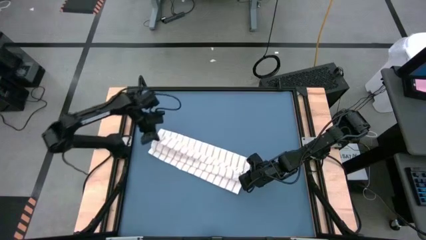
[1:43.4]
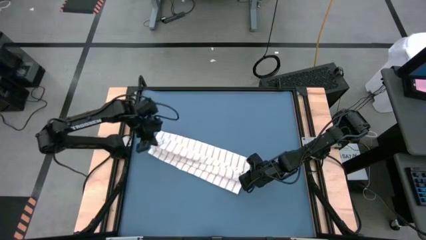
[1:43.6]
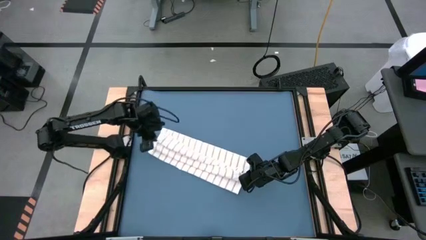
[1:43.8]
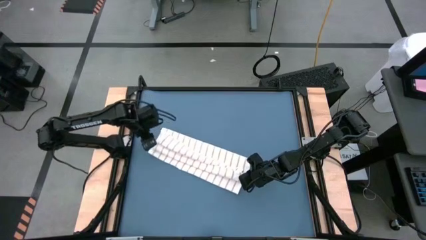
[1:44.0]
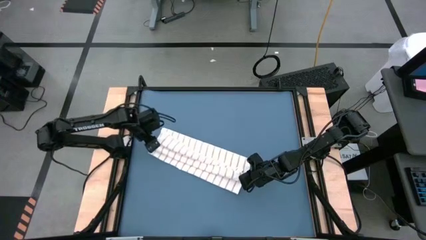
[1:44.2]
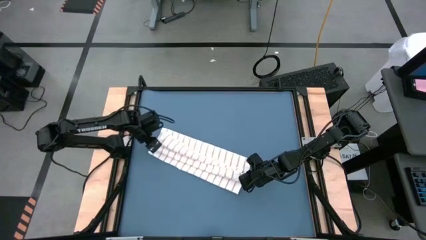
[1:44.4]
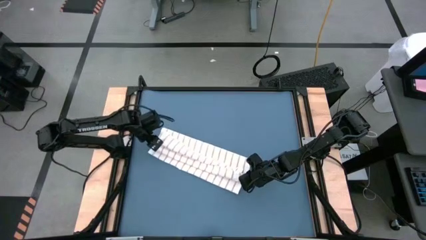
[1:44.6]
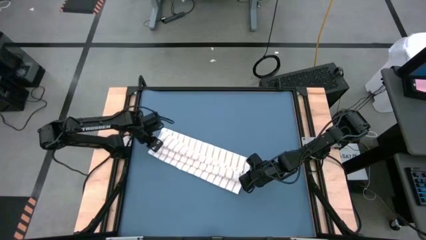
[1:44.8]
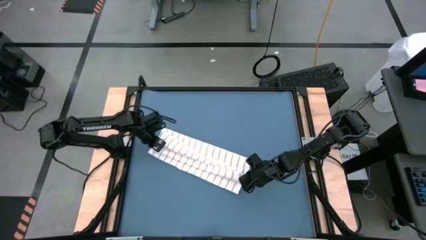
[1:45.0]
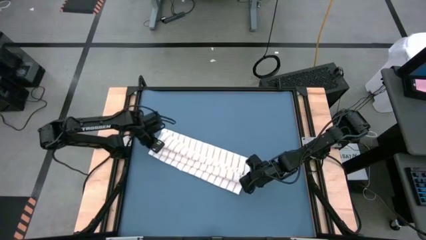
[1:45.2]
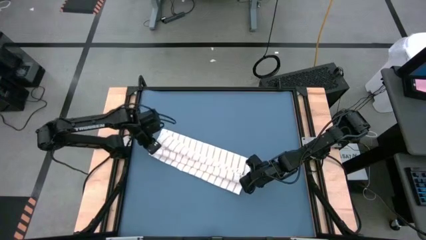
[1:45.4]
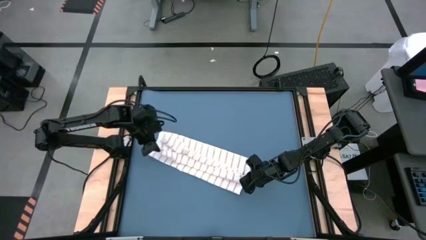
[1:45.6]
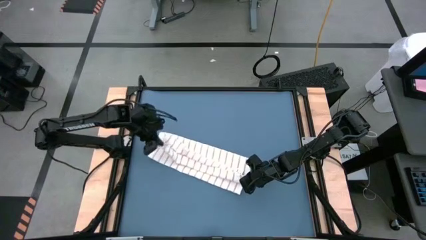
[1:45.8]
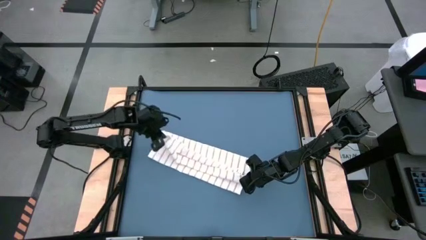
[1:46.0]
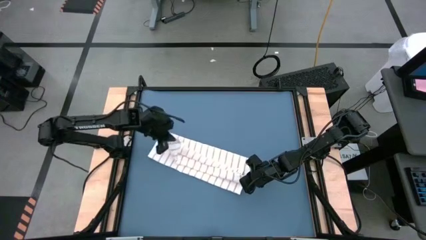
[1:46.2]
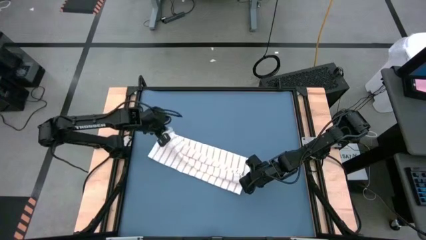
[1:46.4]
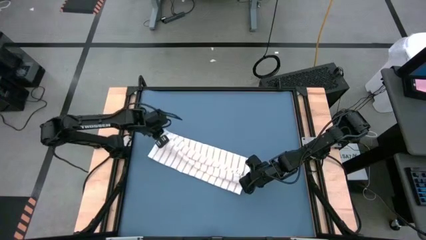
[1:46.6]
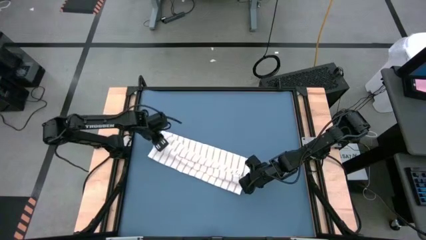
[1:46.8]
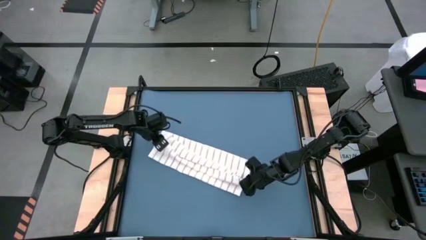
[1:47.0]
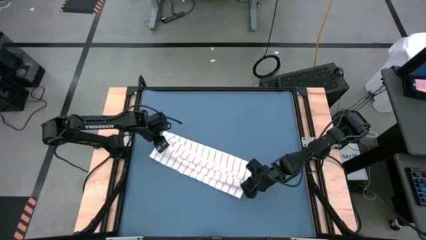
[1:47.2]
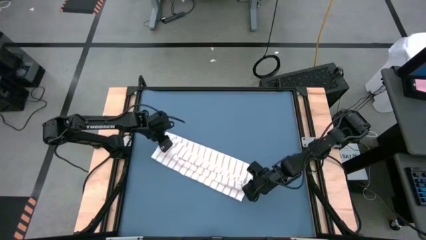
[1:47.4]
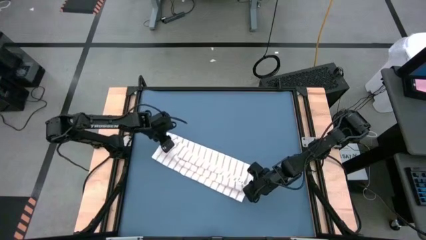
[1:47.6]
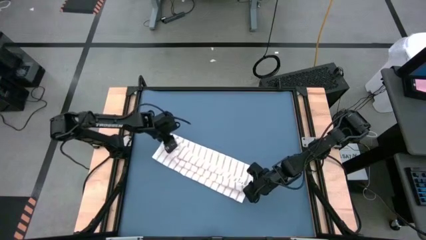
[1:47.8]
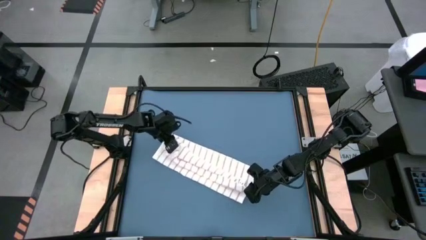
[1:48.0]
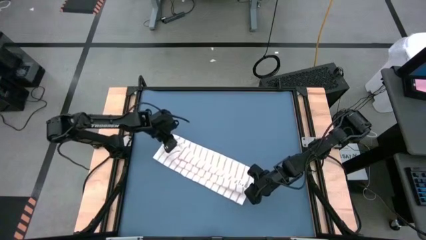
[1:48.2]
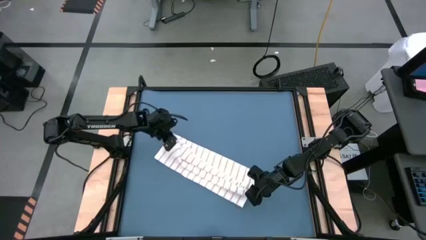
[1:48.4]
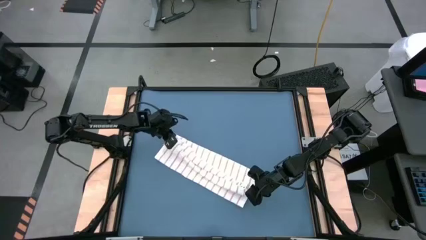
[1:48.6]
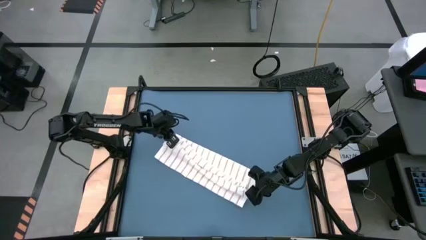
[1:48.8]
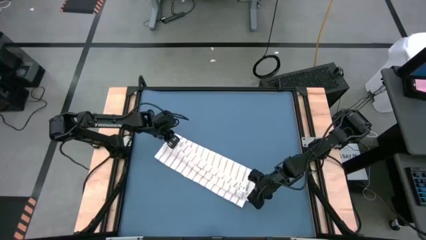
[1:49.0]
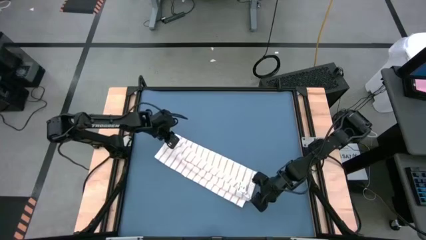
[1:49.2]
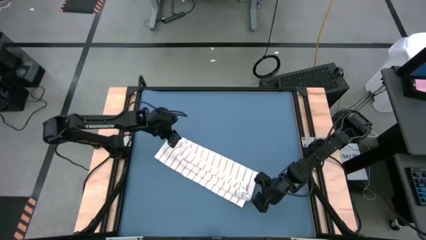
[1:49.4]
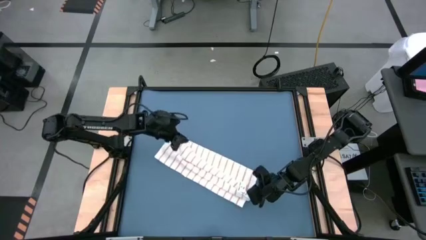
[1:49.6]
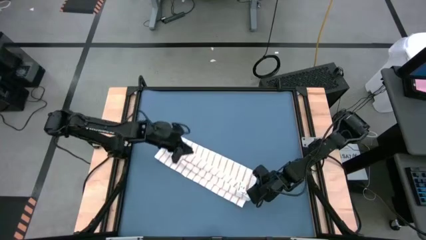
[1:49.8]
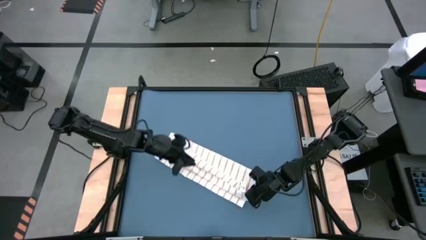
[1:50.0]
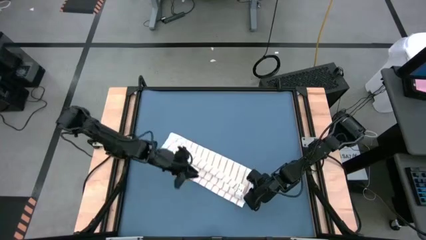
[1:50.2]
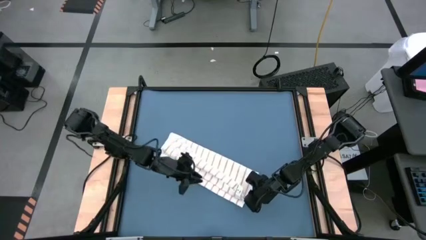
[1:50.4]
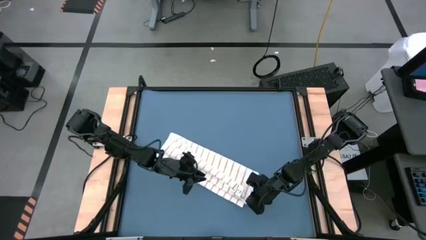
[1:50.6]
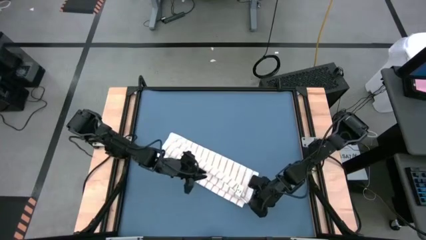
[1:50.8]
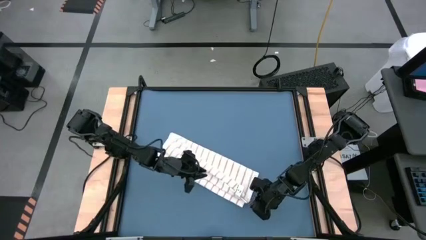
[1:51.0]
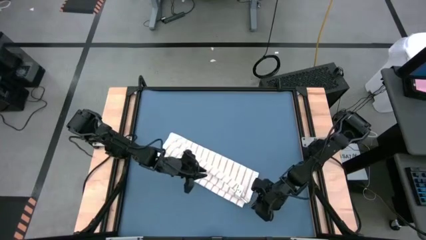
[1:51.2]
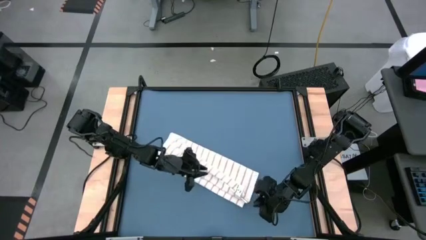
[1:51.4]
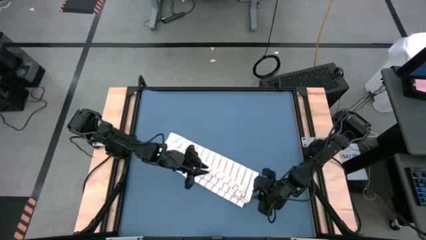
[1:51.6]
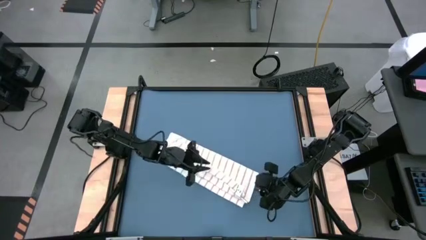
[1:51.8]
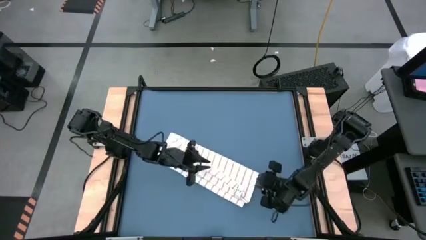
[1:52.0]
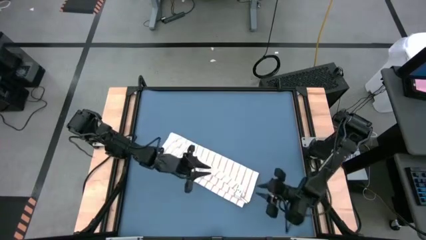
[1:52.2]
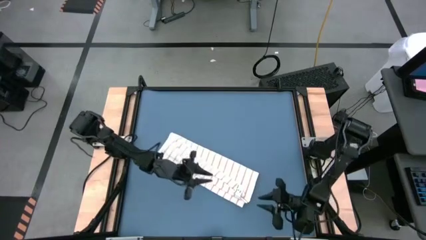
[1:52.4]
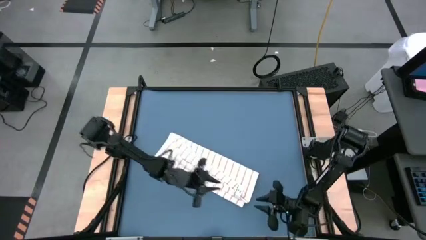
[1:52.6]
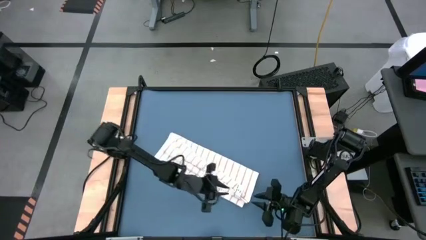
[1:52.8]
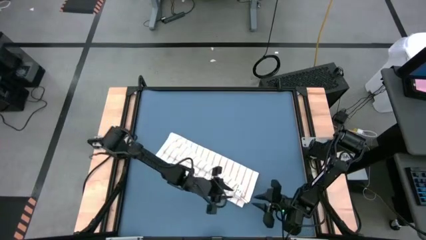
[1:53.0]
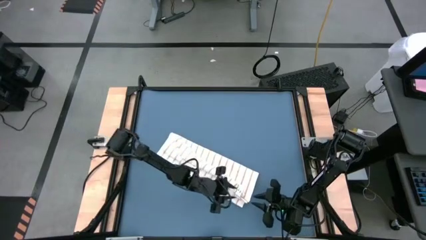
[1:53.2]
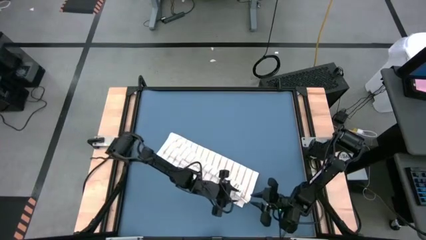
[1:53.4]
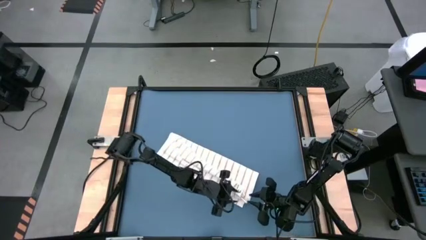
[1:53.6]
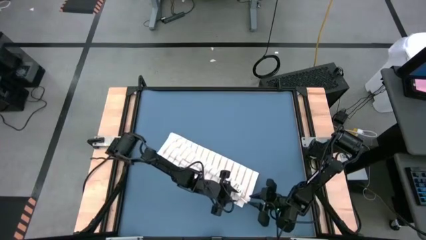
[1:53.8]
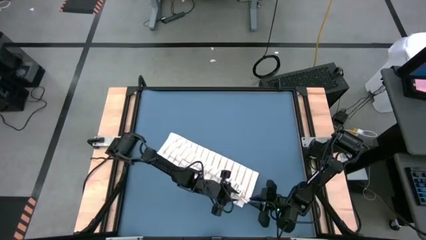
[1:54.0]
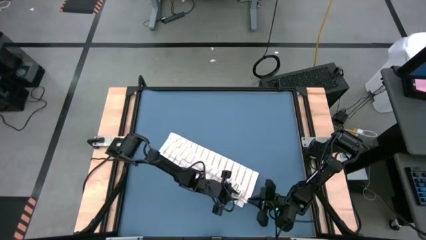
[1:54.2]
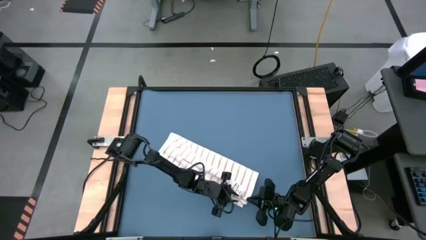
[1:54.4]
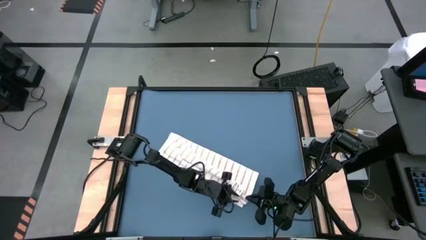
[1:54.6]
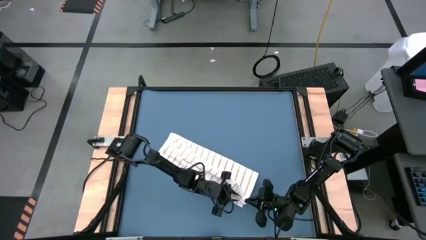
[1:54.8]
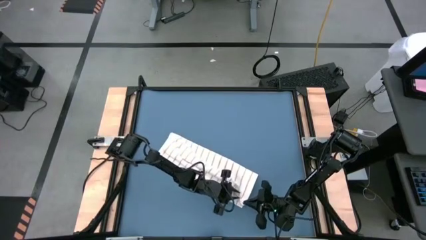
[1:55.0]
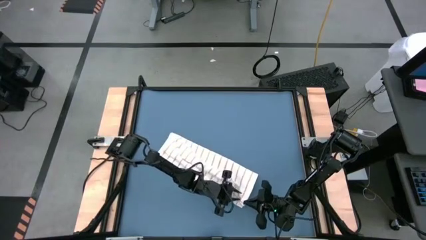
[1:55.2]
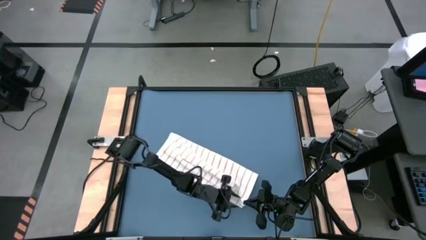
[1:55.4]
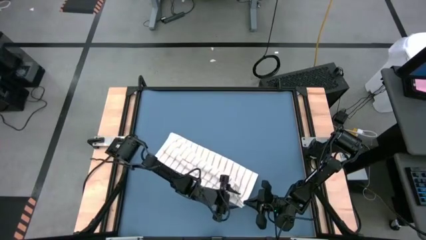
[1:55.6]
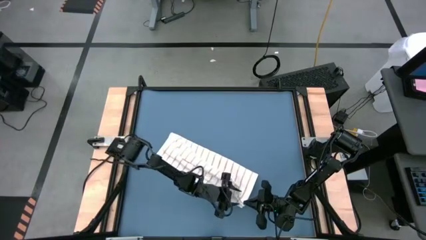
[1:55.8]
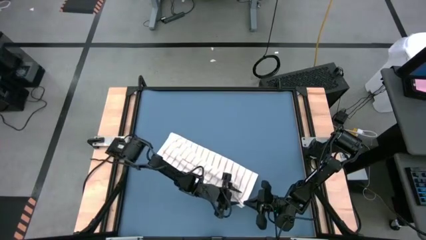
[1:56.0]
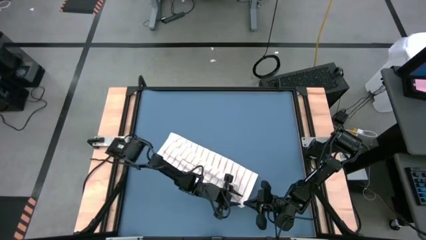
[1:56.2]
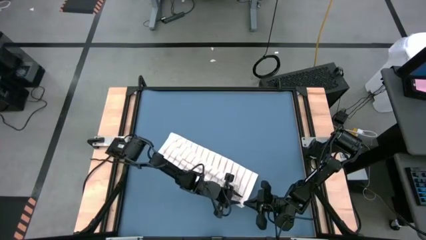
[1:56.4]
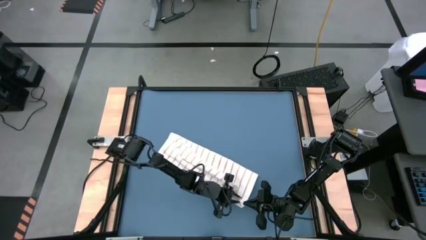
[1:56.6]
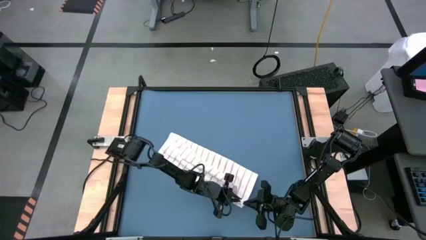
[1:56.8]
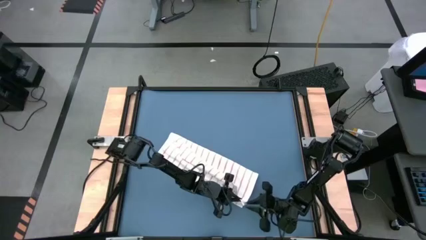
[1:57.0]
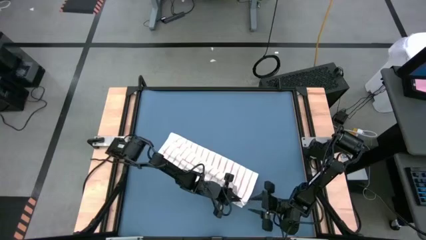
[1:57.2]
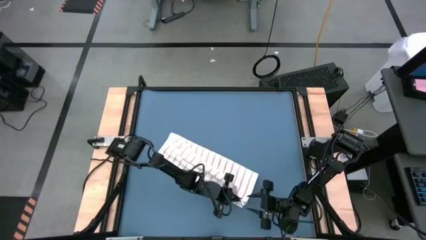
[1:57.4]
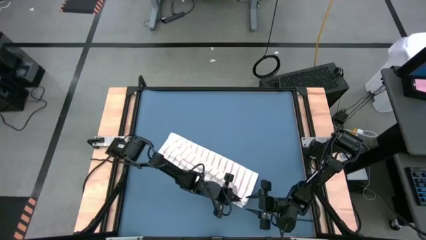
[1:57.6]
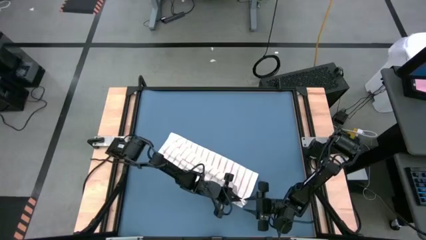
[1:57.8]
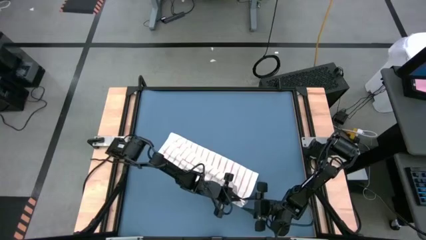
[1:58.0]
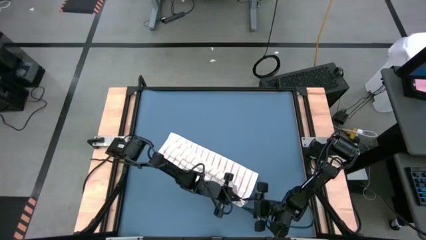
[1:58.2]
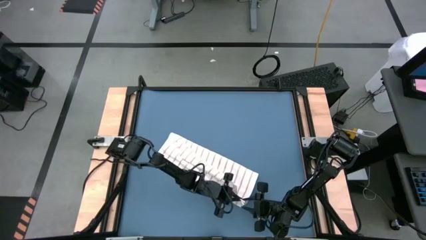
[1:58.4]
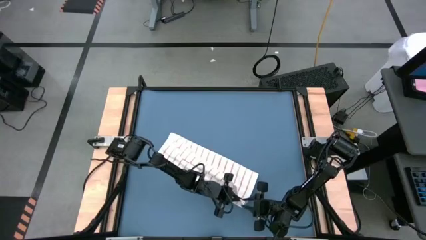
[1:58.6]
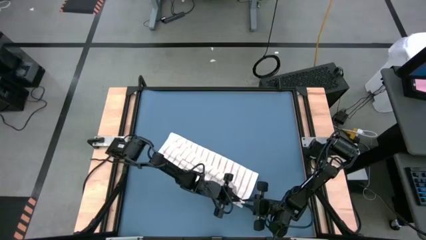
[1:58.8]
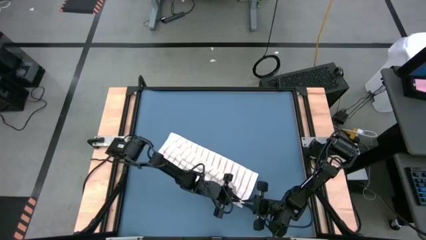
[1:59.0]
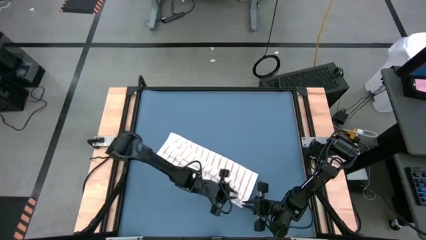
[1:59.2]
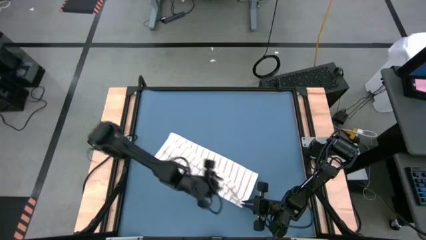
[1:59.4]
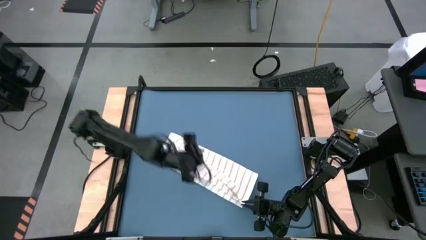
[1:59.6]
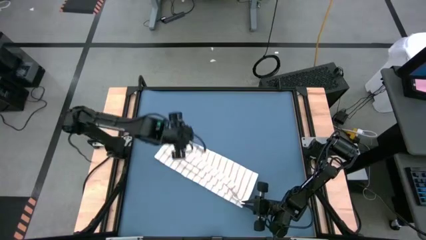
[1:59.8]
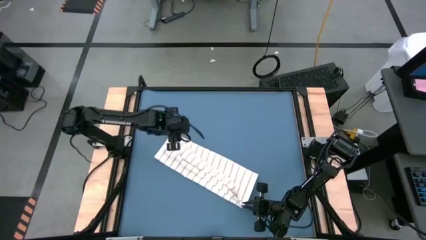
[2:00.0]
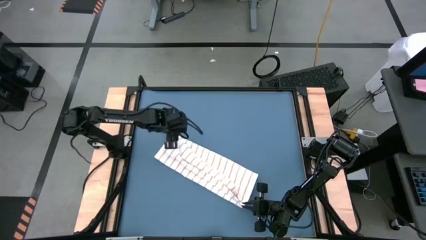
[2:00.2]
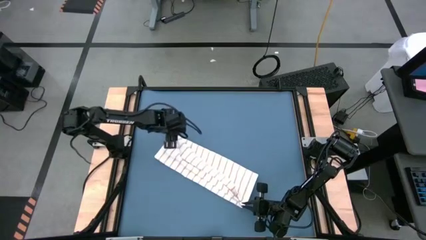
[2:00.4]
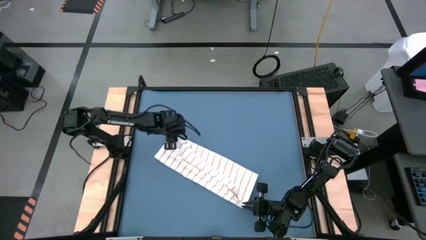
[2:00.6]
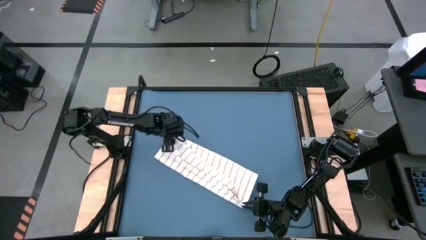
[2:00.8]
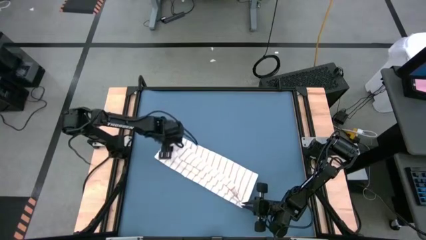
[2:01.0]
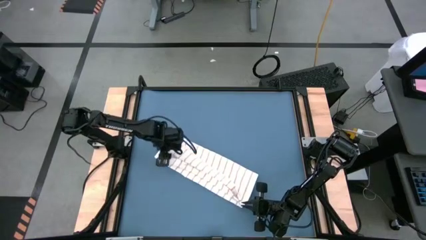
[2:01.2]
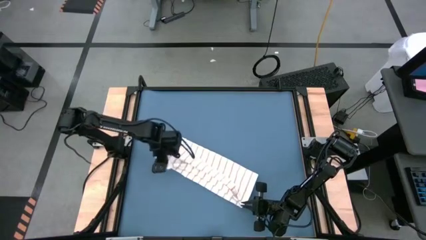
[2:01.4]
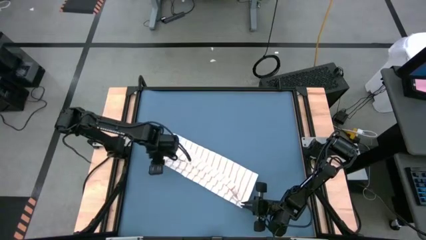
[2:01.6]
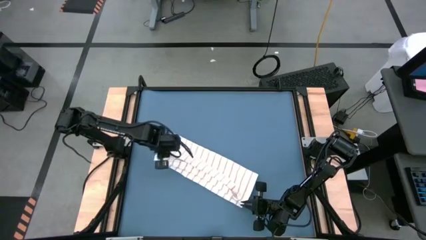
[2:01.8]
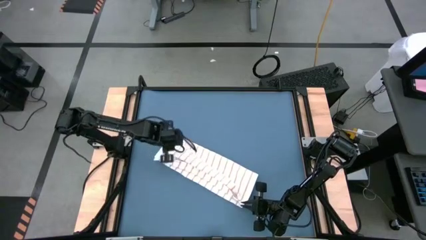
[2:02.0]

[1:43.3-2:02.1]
Task: Roll towel
Fold the white towel
